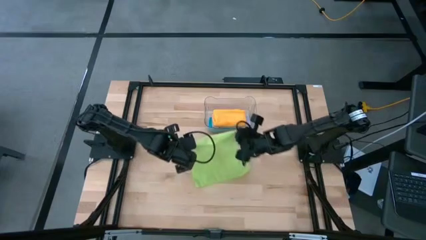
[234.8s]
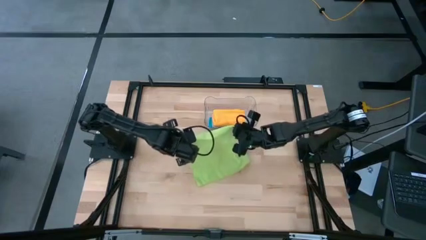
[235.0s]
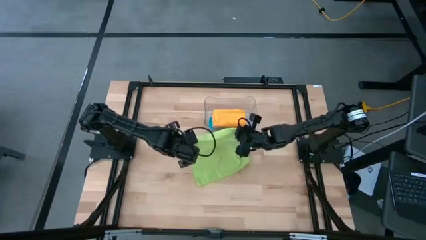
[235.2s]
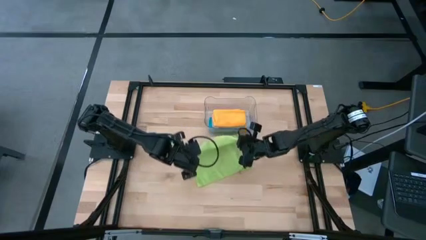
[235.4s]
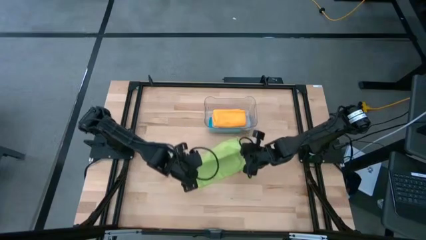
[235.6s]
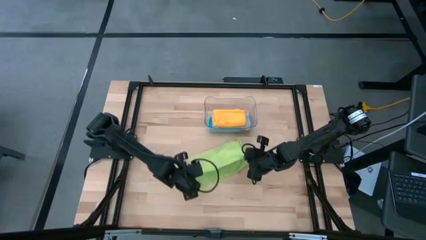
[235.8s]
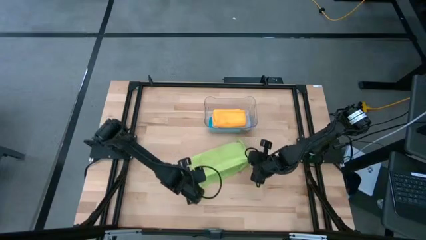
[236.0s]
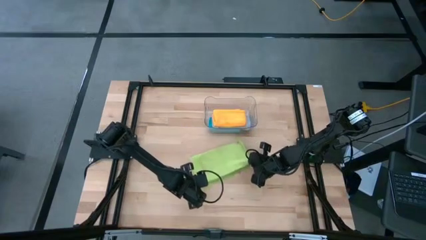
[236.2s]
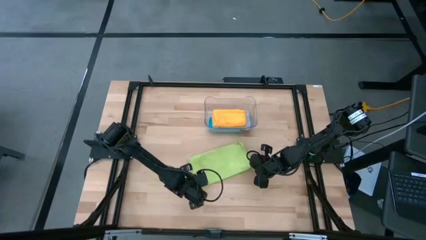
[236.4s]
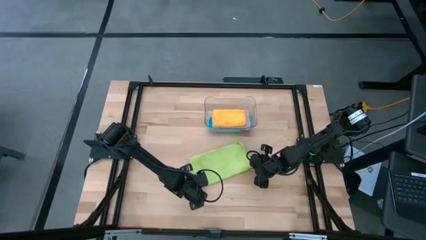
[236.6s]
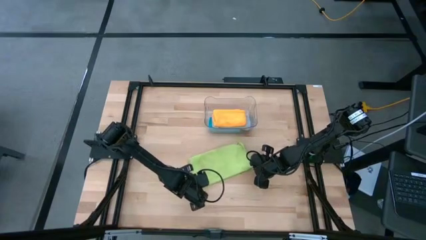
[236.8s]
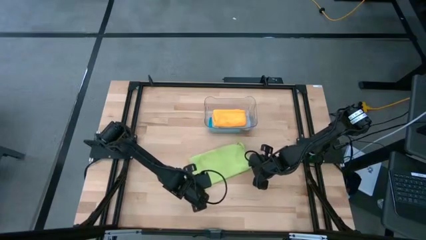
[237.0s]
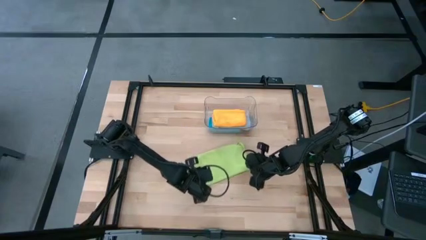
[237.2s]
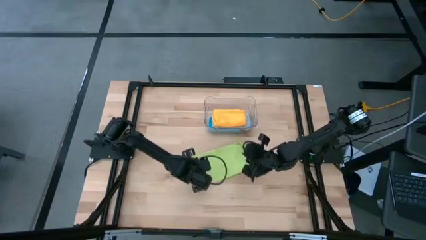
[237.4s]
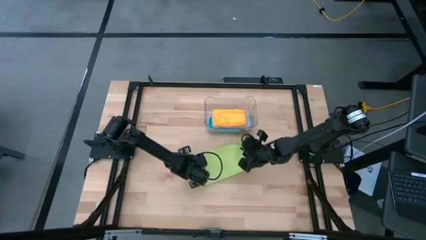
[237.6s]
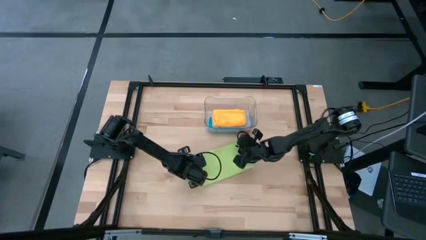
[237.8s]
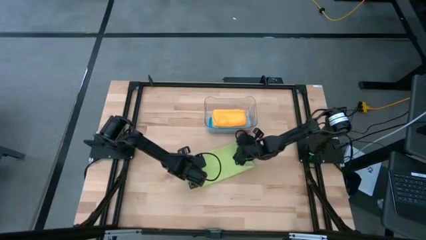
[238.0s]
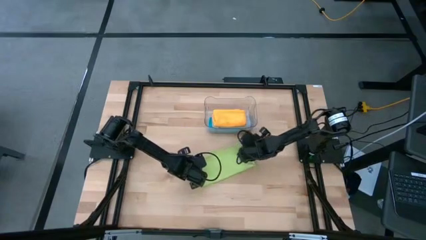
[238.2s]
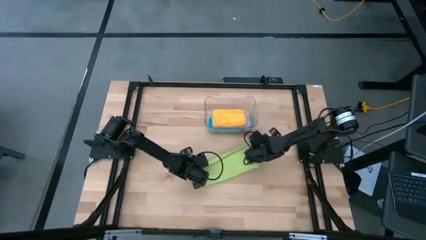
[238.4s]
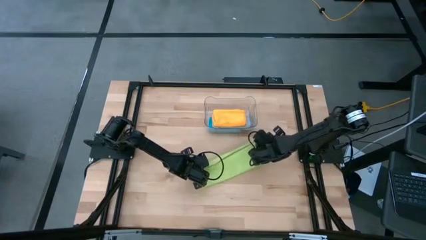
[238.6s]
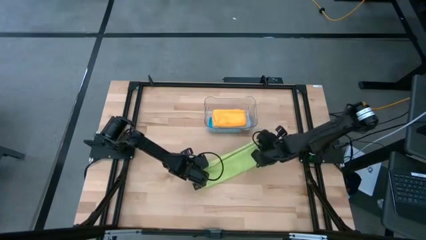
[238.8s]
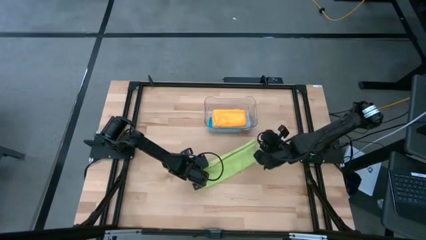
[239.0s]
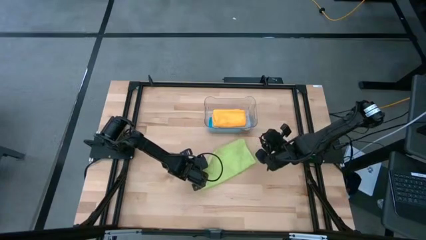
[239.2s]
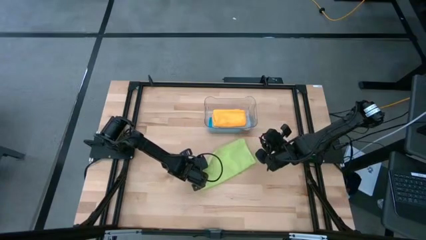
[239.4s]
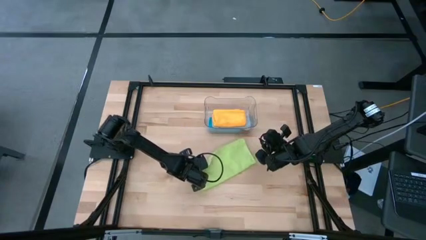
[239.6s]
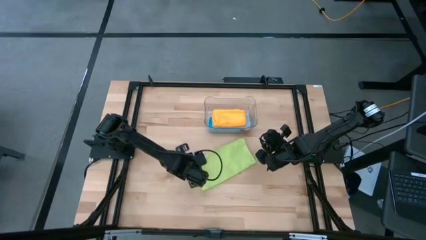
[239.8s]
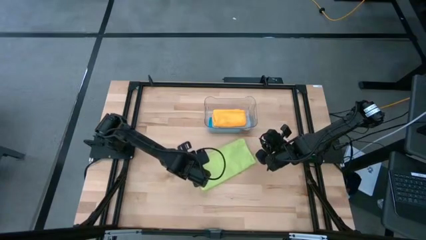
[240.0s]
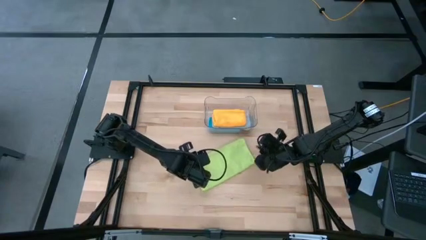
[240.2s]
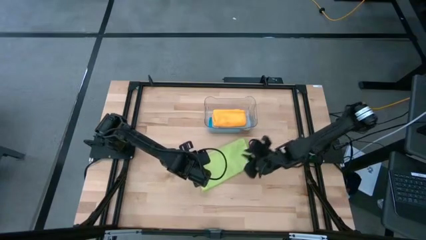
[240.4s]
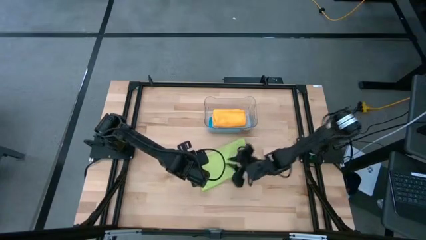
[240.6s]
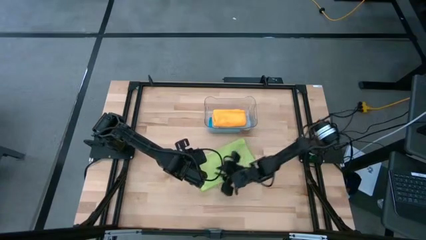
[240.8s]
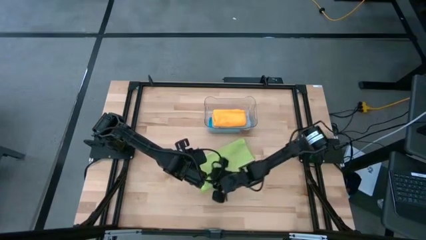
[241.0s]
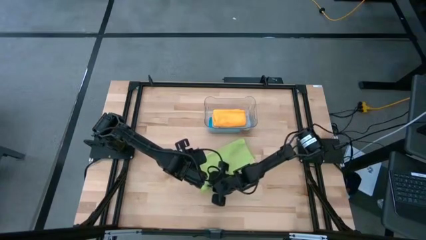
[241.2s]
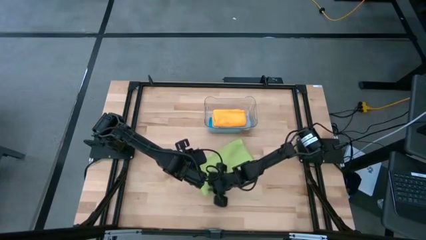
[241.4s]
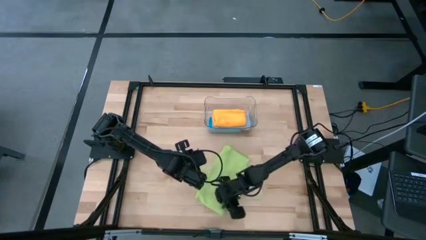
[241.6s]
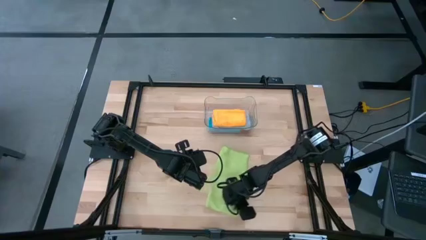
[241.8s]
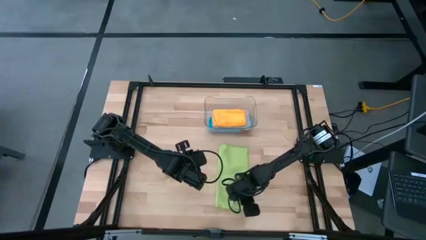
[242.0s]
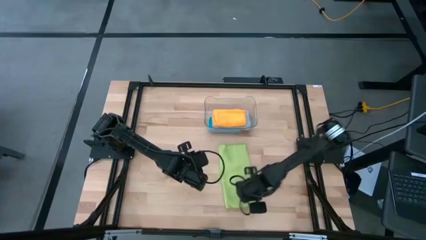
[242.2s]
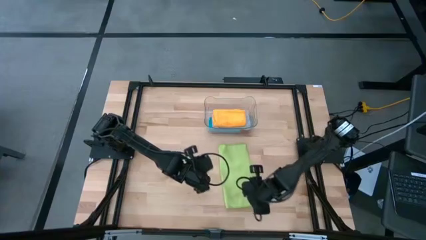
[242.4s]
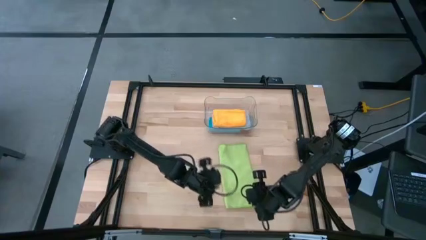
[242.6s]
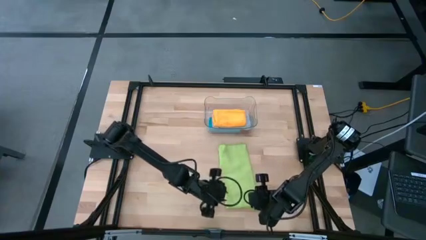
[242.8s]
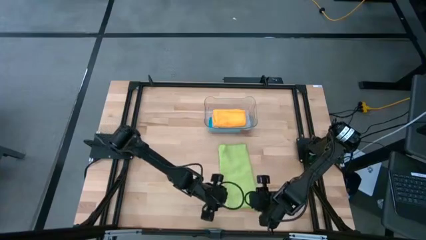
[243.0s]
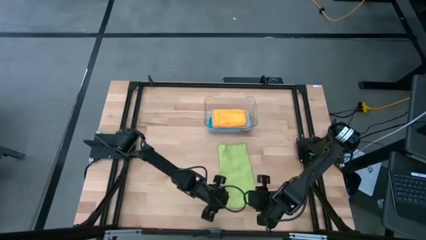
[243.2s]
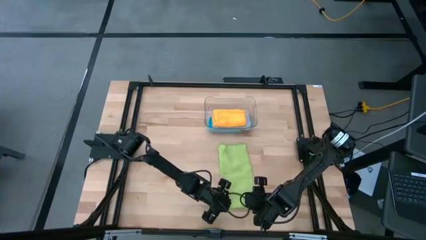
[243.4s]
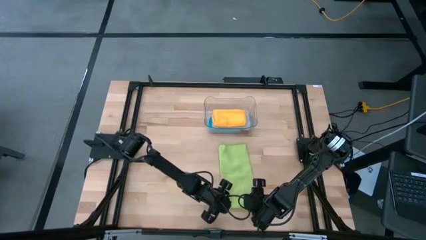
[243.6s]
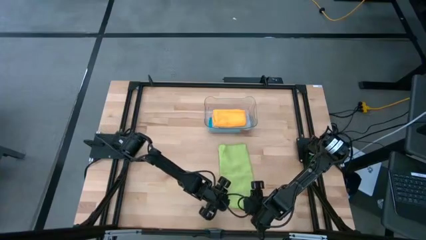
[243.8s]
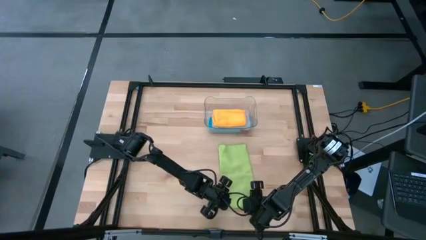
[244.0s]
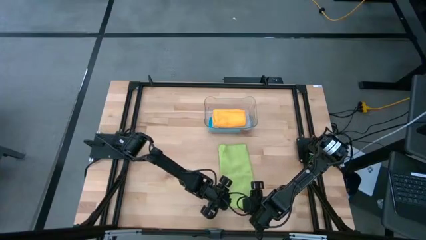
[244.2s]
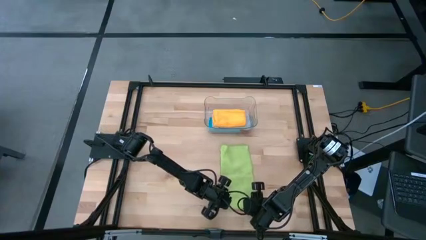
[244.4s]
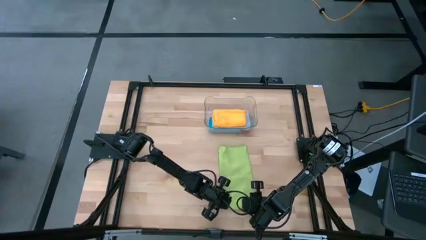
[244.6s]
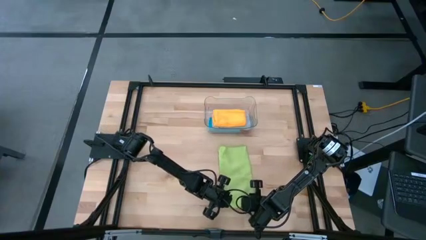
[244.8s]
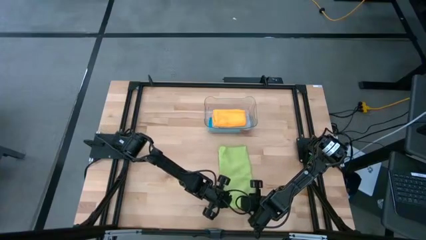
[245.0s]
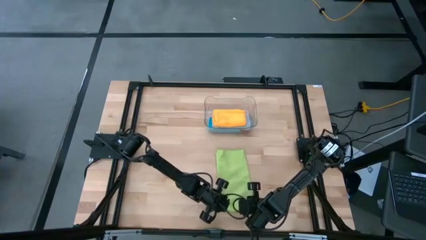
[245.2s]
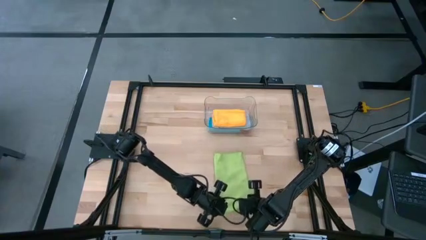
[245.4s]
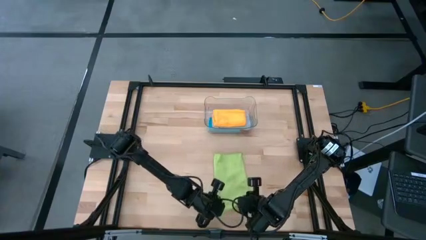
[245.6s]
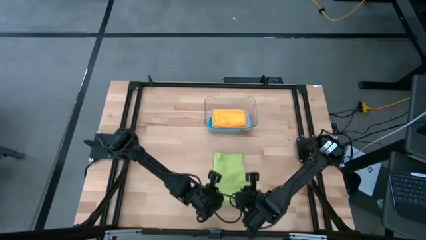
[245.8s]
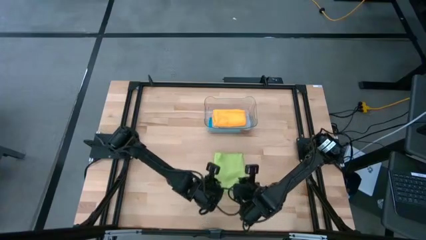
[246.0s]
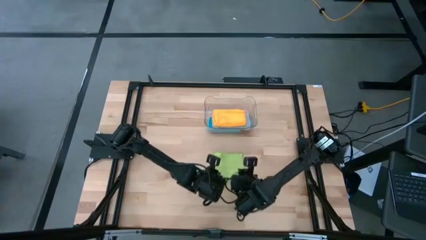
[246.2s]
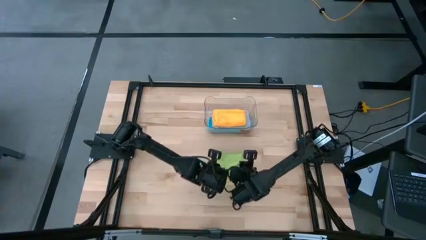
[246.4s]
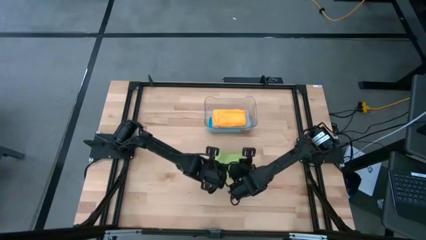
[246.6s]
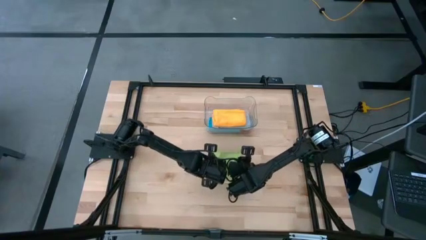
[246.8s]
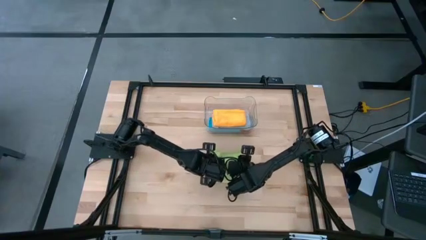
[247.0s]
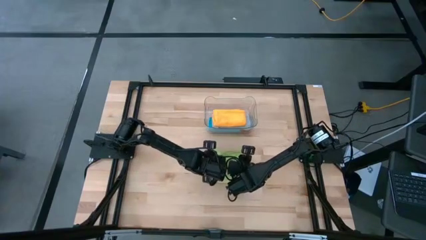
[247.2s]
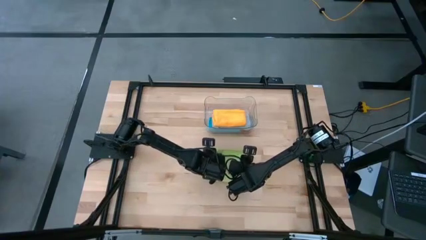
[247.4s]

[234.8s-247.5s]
Task: Fold microfiber towels
Fold the green towel

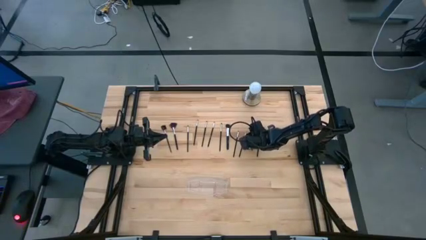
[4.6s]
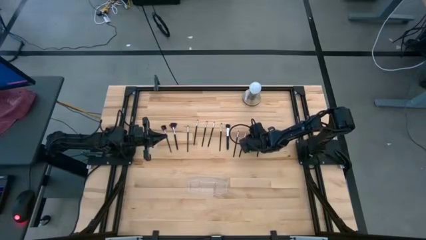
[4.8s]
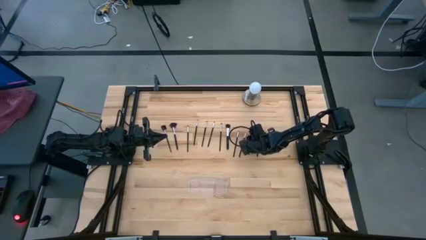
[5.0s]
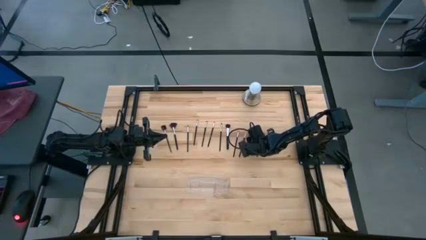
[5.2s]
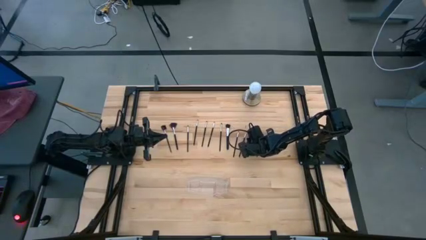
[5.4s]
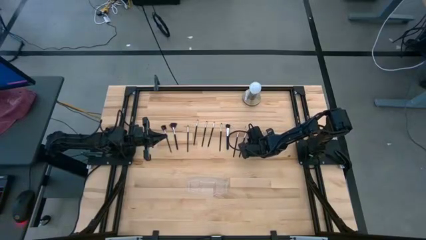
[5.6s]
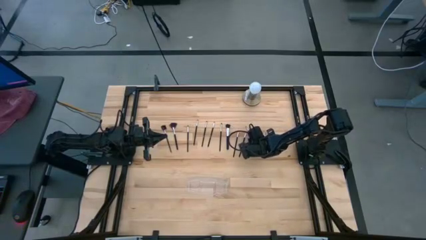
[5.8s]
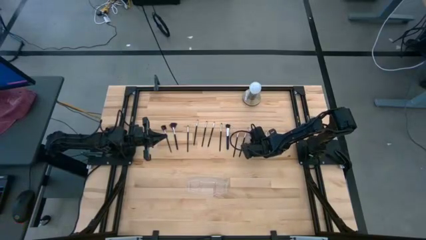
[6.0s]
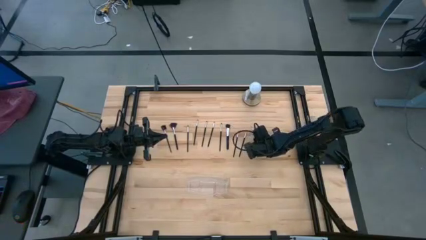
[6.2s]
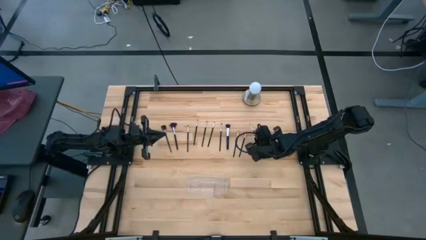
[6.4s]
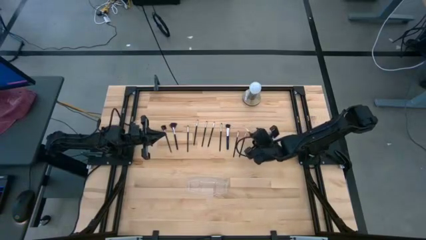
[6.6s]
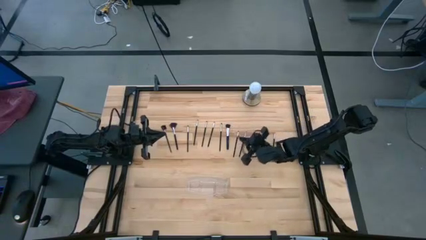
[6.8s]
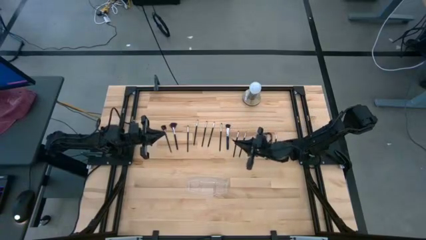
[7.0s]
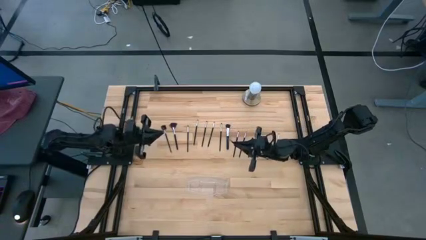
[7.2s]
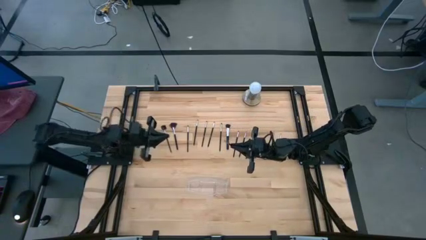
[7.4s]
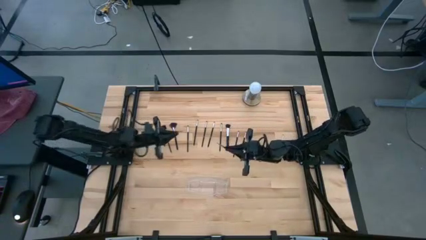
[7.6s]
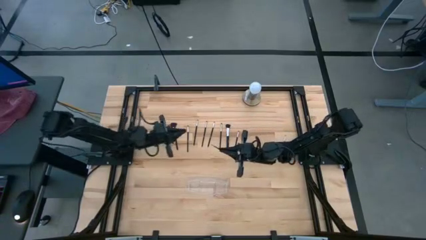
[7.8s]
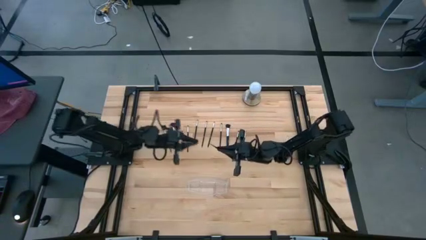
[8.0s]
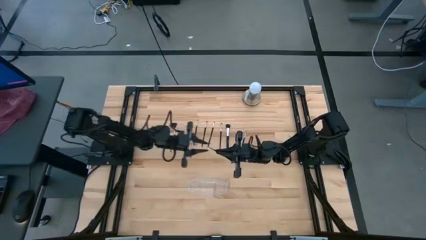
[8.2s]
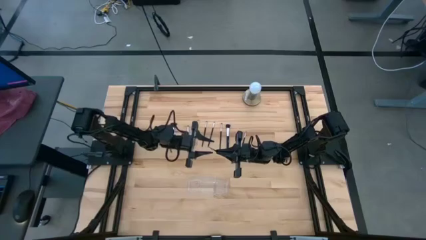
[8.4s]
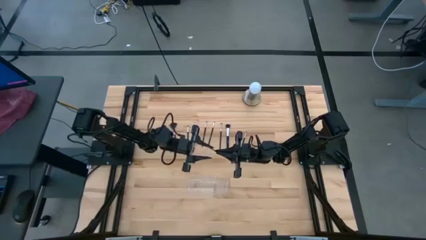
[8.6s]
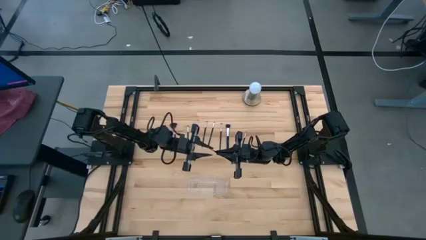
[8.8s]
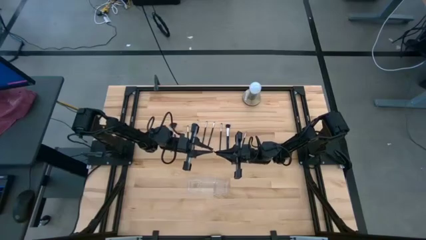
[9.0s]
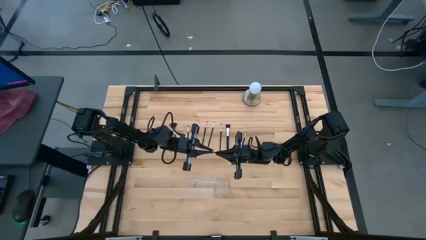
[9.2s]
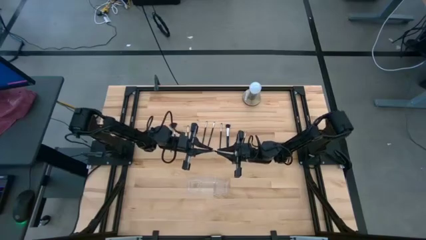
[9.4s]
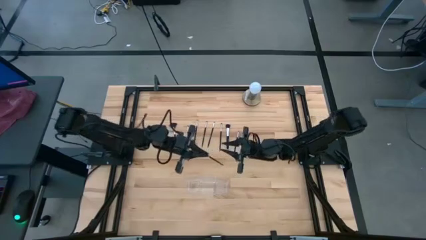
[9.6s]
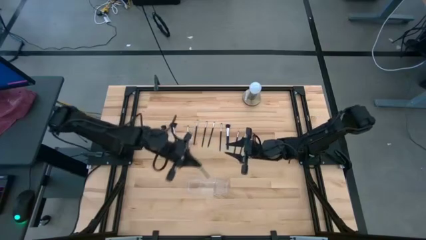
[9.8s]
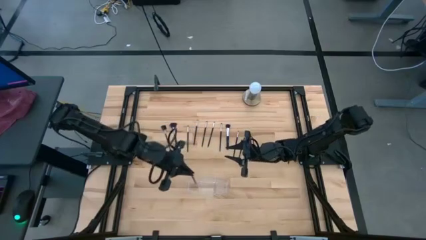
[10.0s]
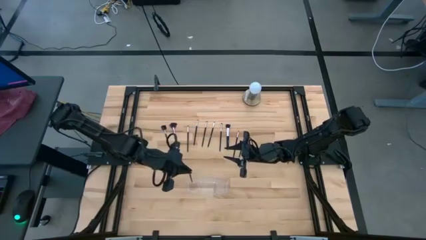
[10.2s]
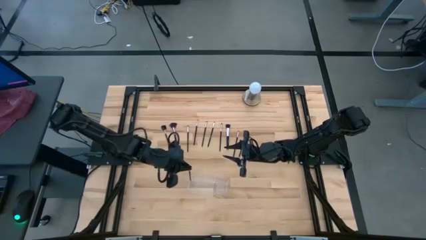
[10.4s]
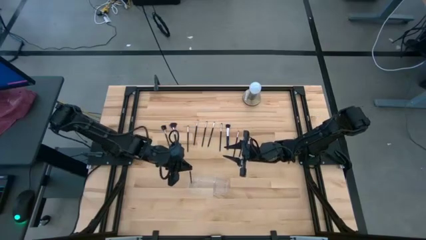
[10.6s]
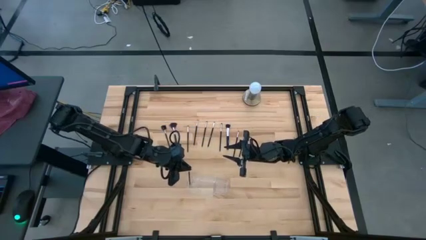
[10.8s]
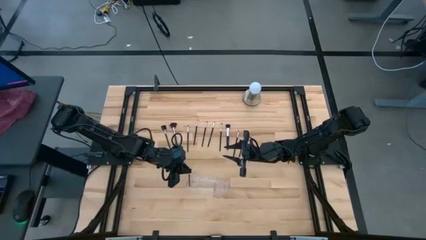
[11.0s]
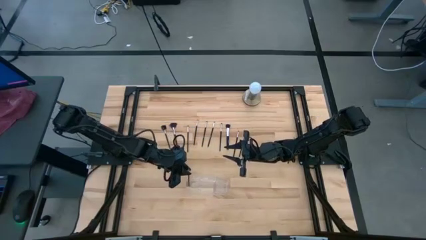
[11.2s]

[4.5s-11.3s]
Task: Put items in baskets/containers
Put the black eyeshadow brush into the transparent organizer
